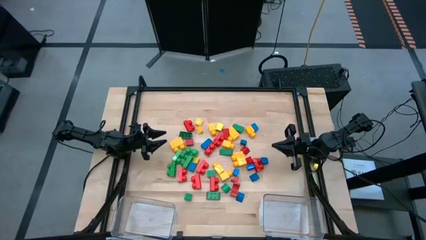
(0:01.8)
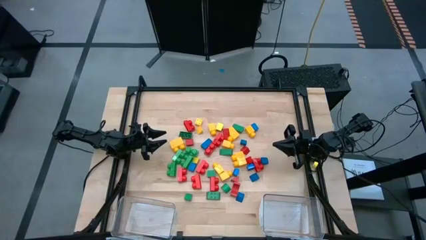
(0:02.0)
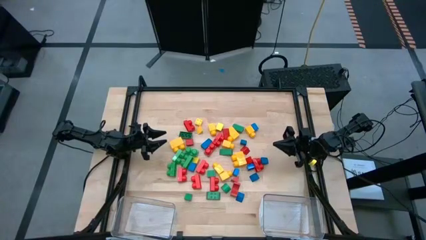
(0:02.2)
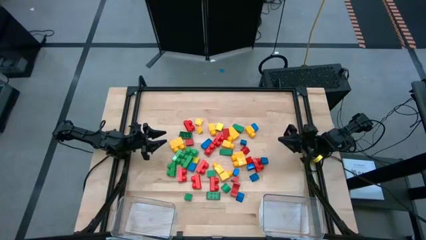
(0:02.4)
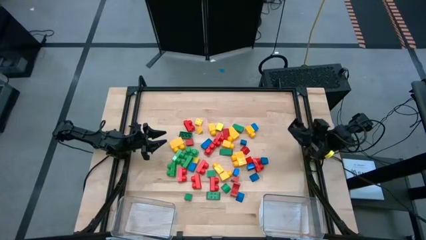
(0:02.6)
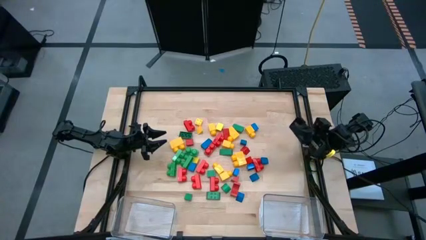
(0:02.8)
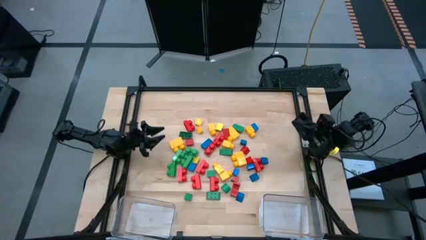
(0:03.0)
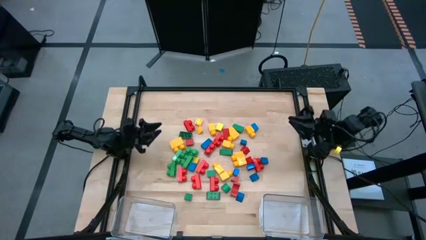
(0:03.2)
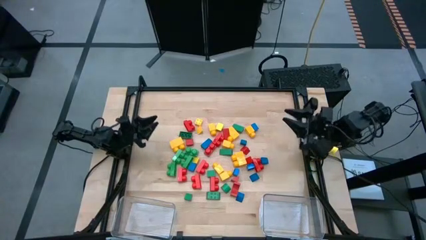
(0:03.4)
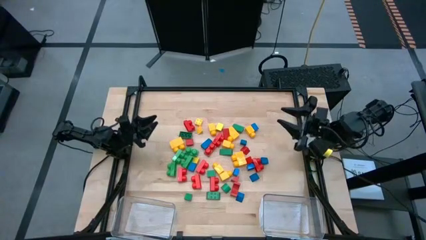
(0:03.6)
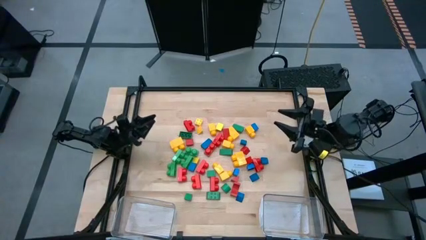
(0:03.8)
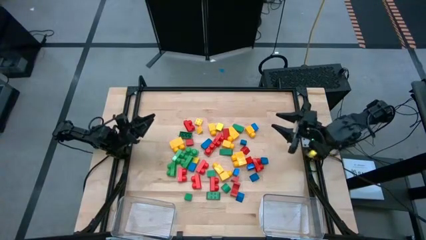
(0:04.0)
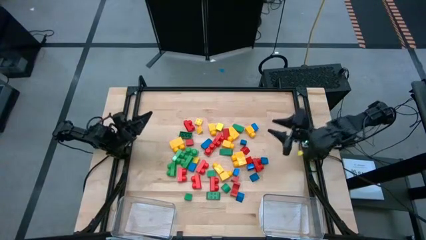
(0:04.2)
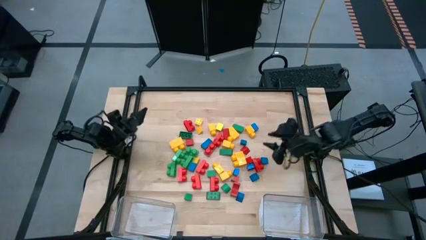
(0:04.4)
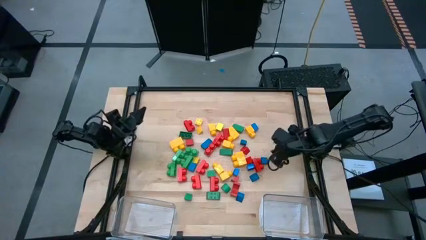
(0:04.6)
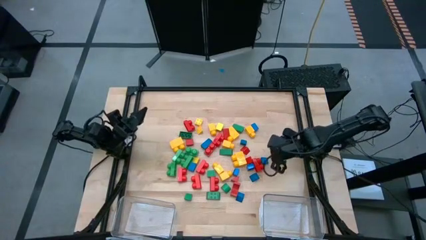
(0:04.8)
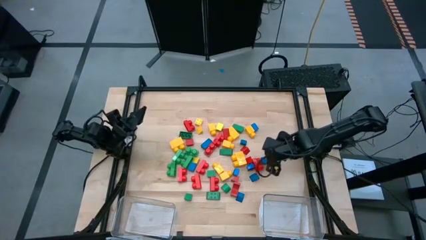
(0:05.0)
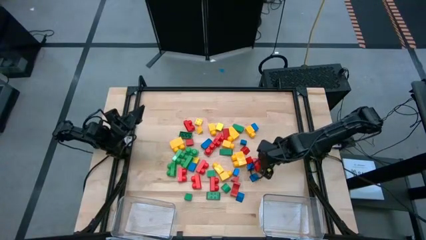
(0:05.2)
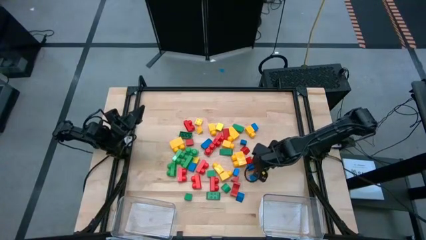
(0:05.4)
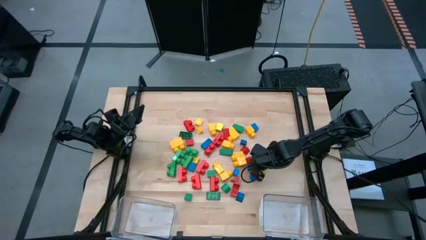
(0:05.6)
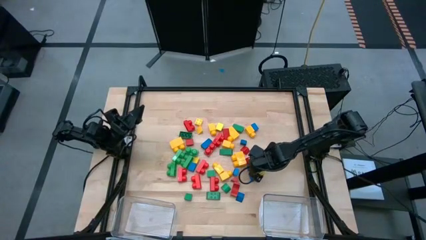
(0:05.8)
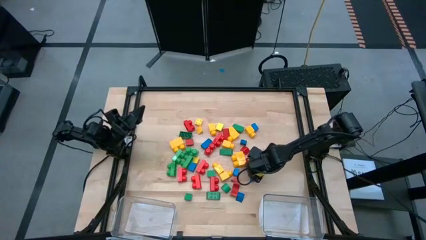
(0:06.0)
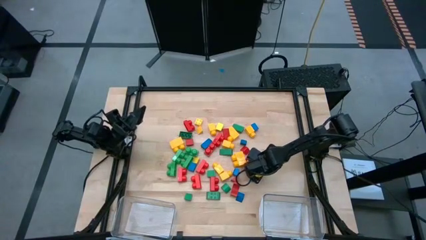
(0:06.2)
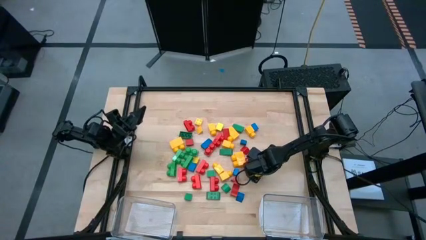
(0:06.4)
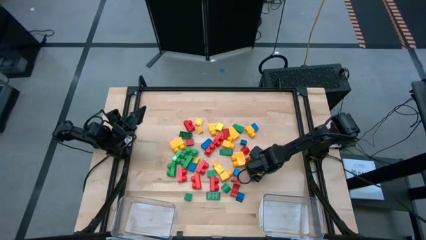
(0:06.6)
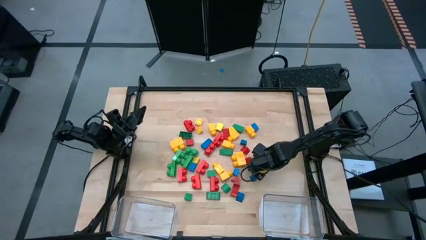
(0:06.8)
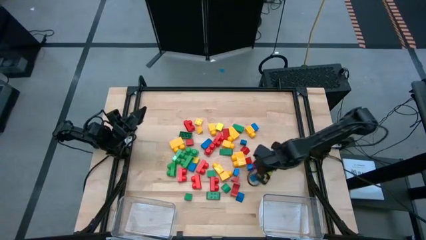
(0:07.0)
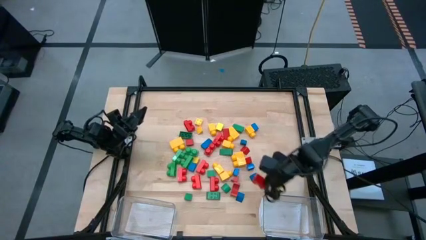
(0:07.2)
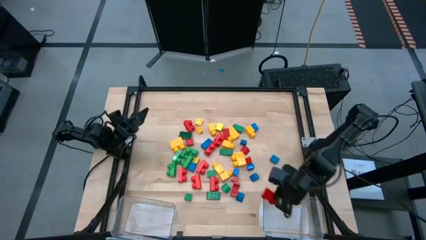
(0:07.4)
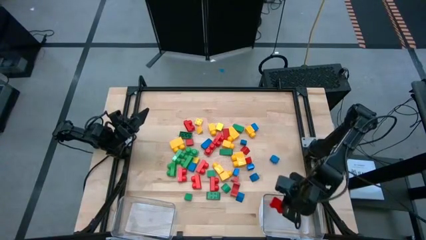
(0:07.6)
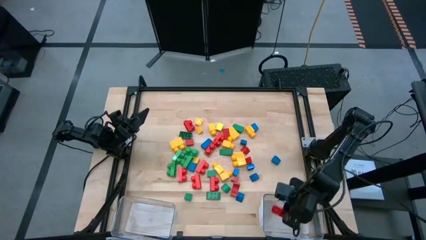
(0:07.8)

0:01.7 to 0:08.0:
Task: Sort blocks by size
Put the red game piece into the right transparent bin

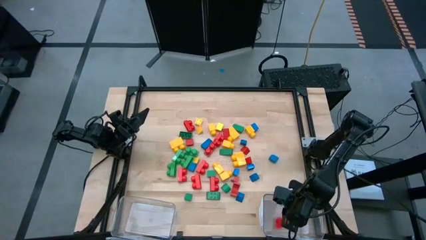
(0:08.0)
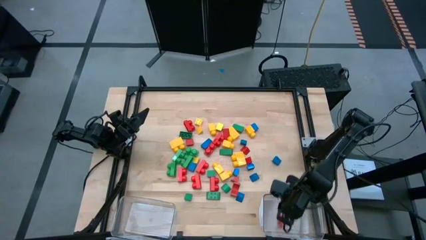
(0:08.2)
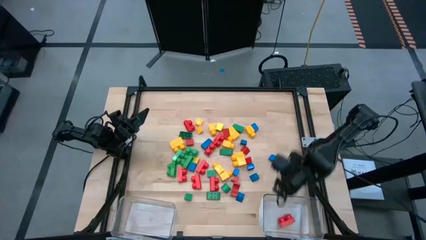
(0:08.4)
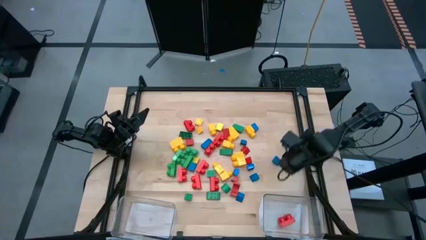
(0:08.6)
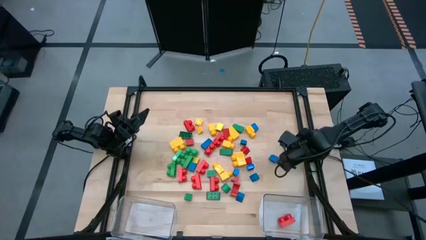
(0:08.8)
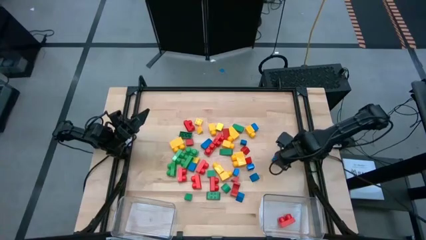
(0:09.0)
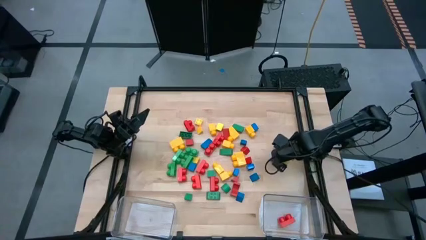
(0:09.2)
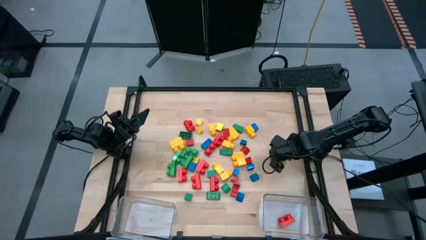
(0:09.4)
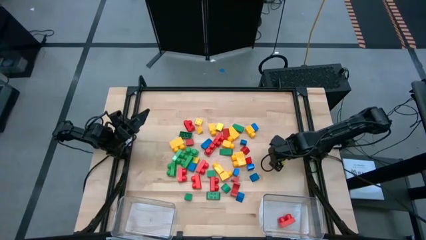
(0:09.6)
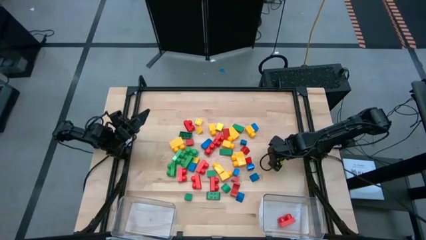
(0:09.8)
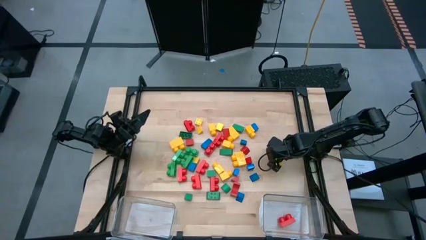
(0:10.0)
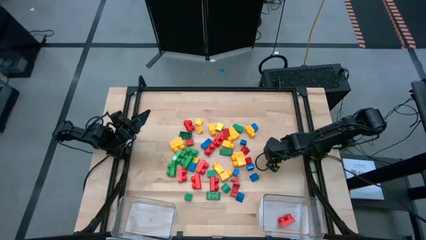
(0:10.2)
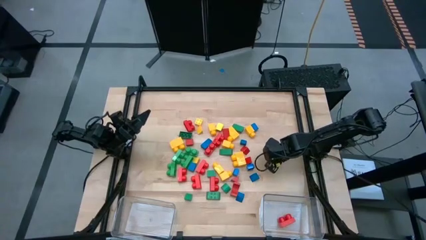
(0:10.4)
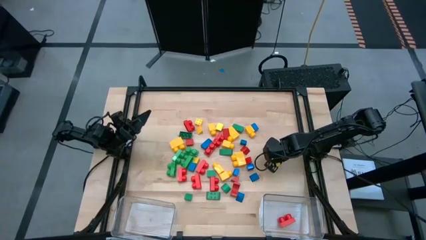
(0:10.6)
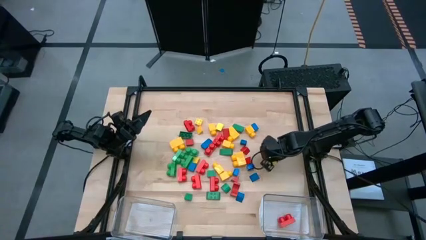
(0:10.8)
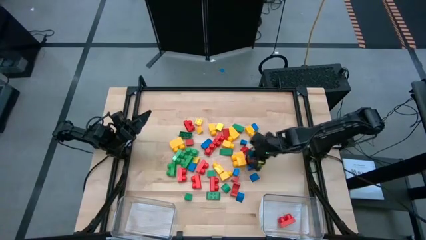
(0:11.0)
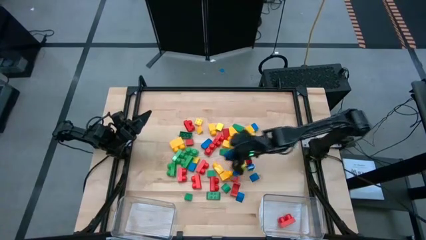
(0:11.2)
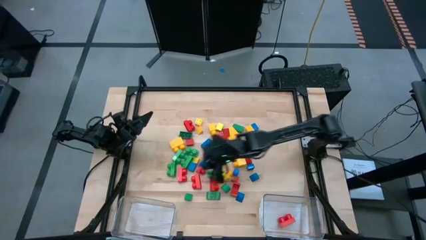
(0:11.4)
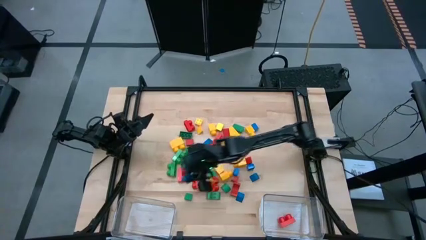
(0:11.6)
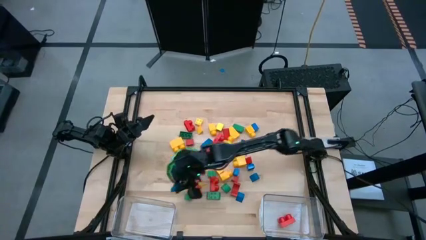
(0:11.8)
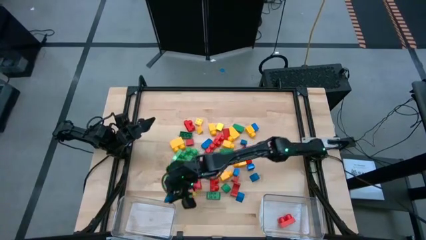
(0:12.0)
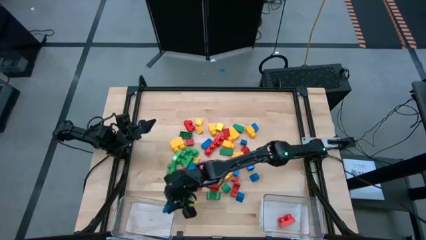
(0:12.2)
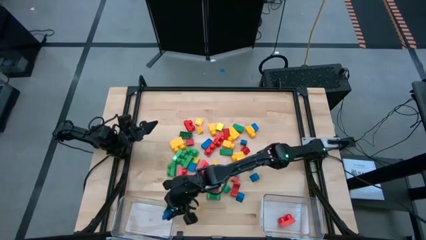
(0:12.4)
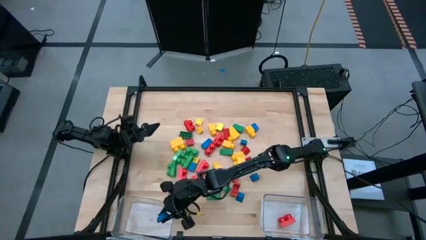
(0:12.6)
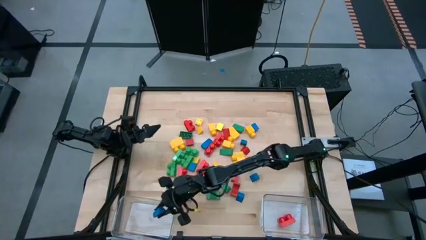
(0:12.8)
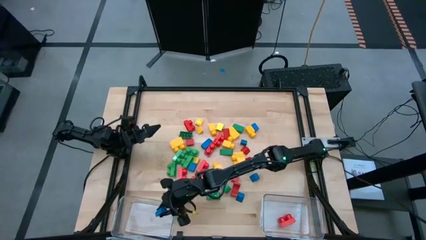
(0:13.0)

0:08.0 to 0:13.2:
Put the blue half cylindrical block into the left transparent bin

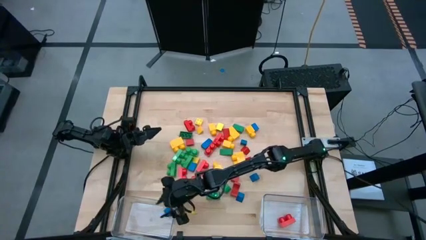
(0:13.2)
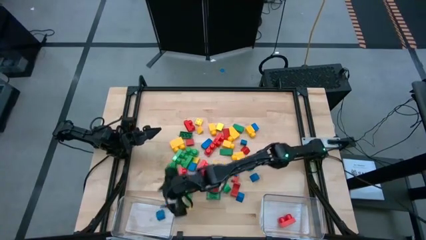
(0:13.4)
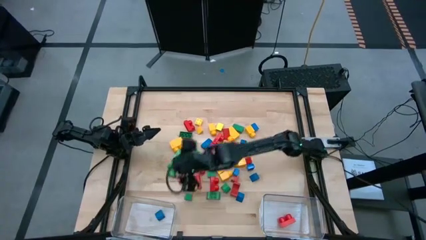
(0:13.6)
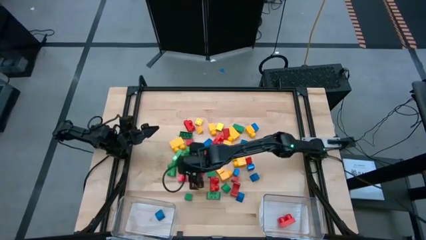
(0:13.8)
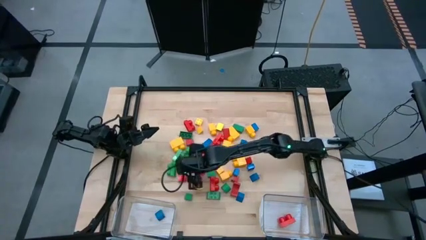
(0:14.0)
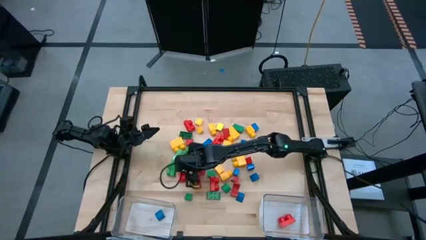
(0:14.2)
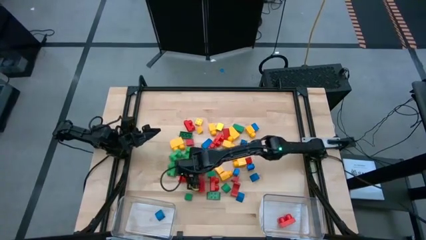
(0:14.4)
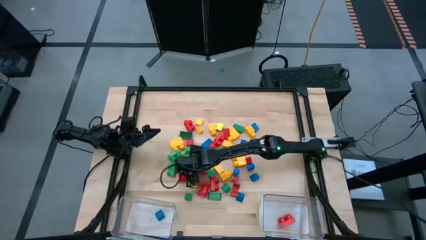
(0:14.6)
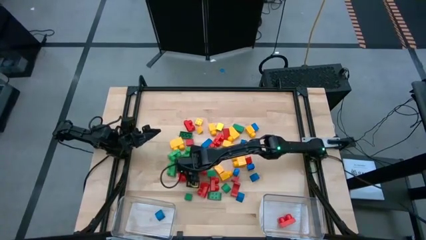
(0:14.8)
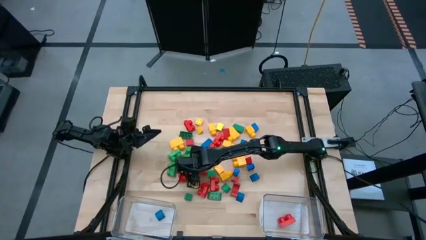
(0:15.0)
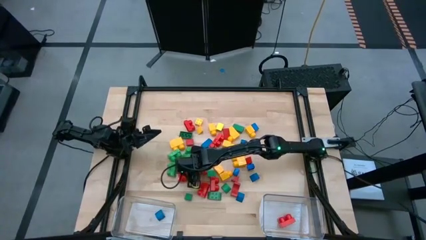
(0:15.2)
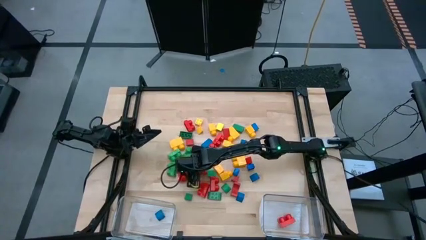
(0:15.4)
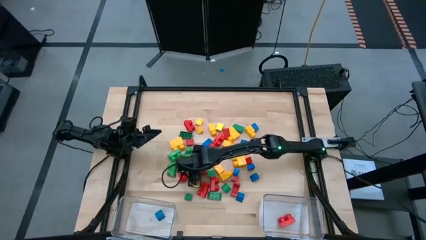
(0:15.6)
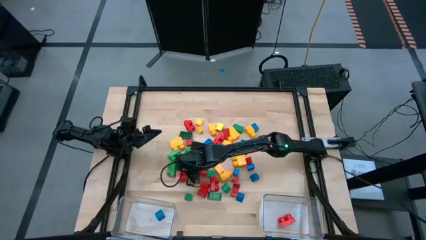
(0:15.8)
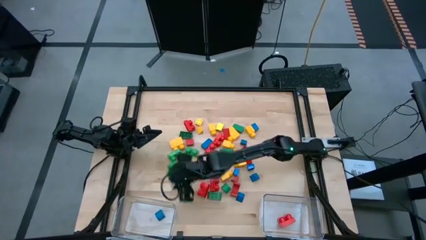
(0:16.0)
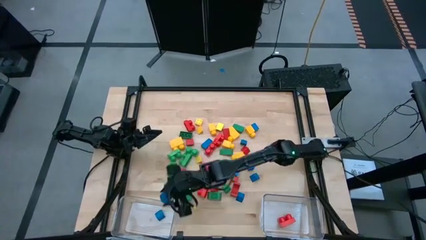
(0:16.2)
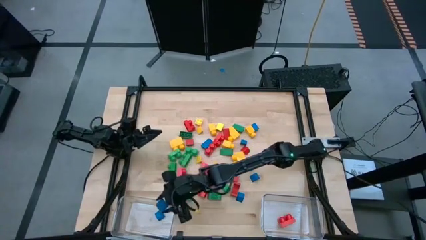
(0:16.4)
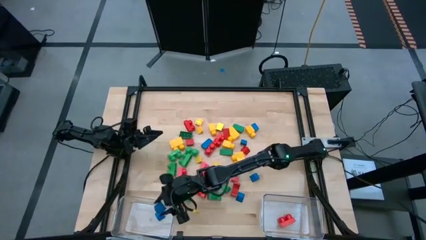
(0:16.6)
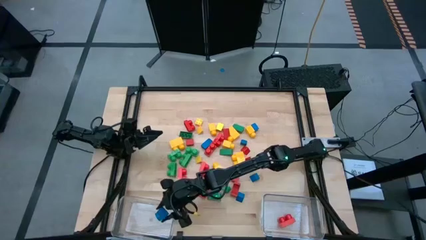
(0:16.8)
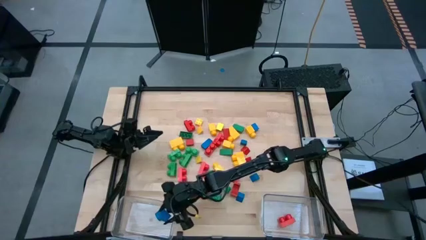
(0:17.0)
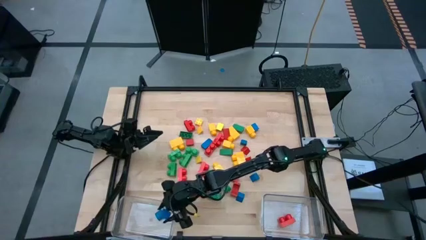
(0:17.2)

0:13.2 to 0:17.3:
Put the blue half cylindrical block into the left transparent bin

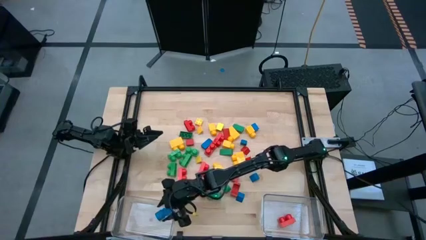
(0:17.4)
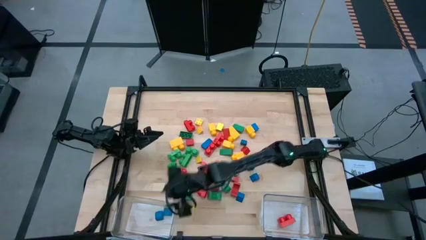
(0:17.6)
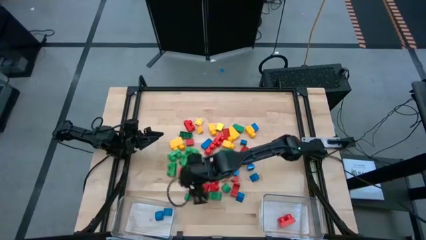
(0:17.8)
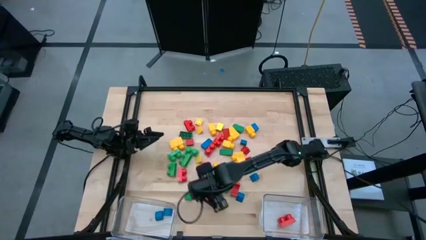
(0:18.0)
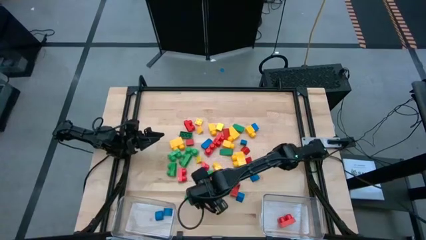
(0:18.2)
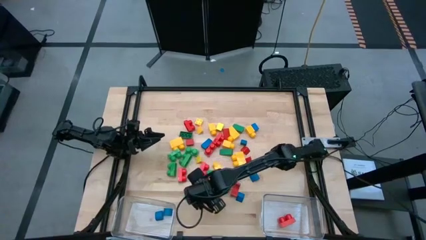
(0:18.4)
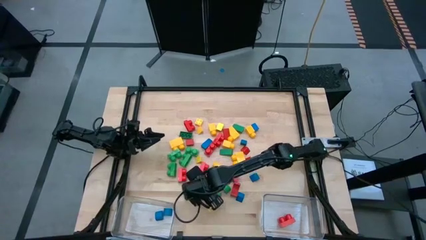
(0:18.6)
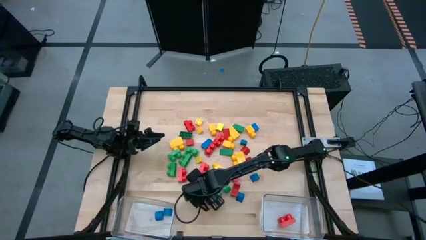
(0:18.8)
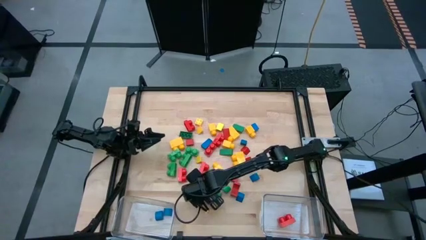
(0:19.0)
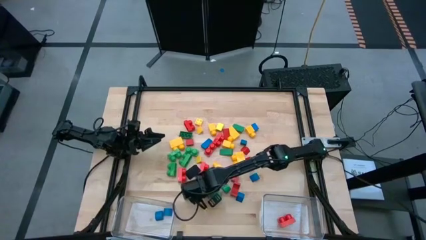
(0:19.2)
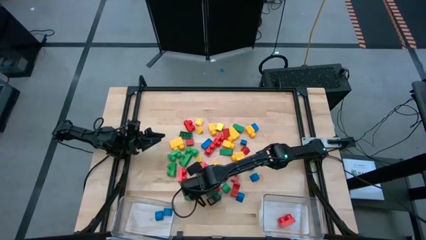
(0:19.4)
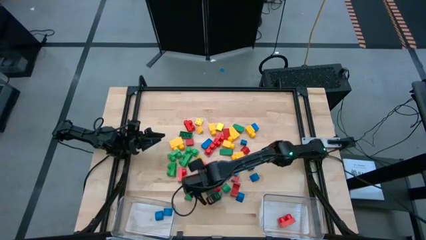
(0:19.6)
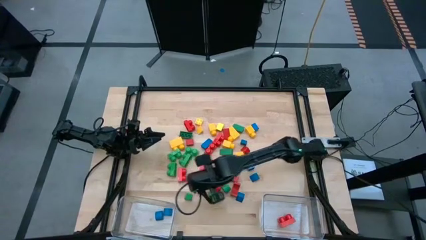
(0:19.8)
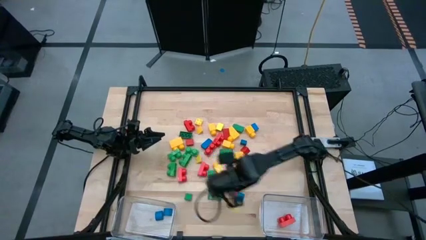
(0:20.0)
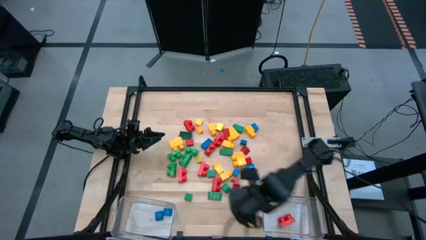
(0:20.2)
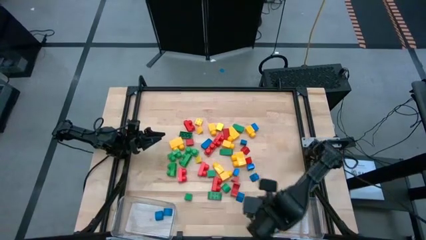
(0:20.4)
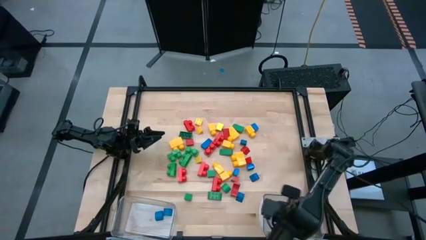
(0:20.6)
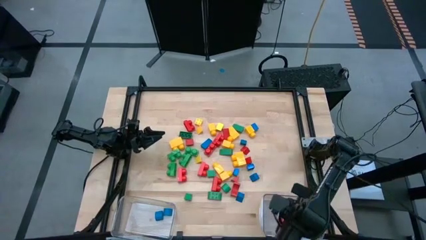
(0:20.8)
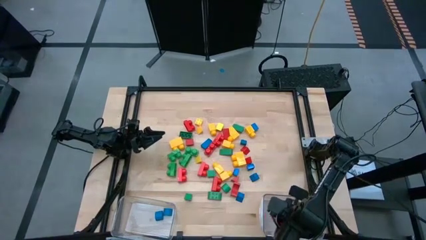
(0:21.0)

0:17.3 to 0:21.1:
Put the red game piece into the right transparent bin
